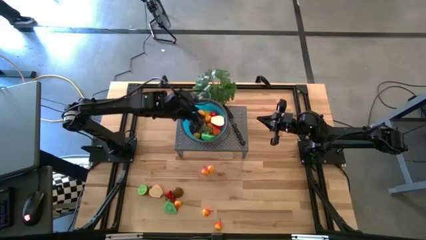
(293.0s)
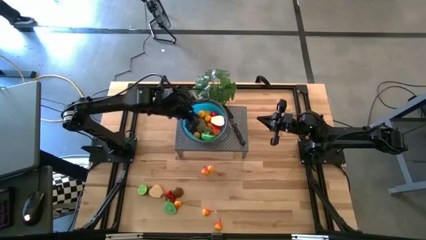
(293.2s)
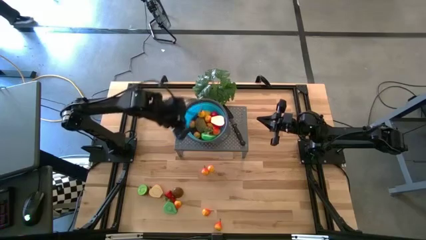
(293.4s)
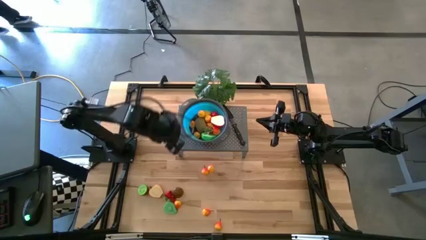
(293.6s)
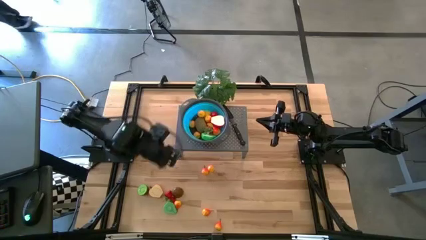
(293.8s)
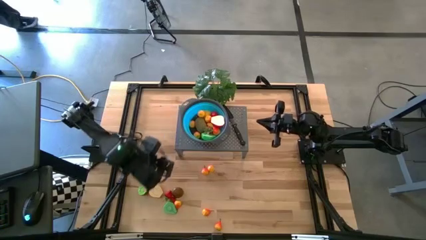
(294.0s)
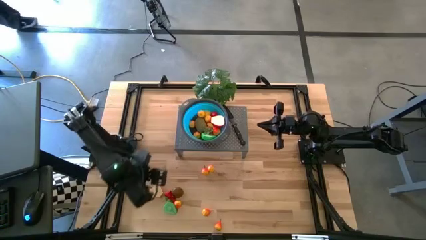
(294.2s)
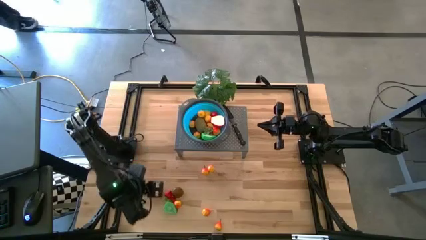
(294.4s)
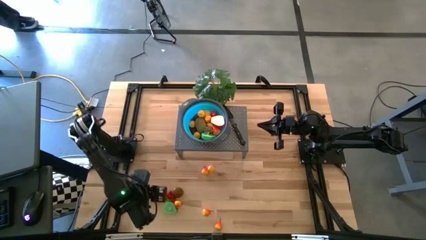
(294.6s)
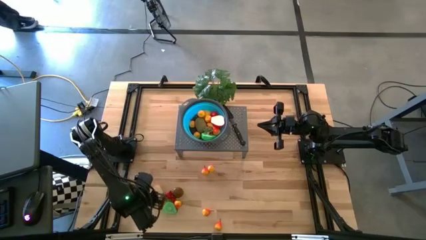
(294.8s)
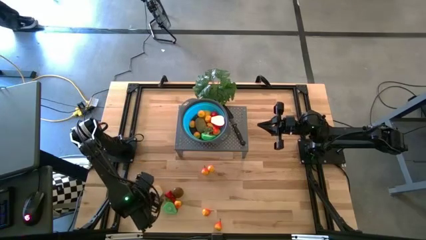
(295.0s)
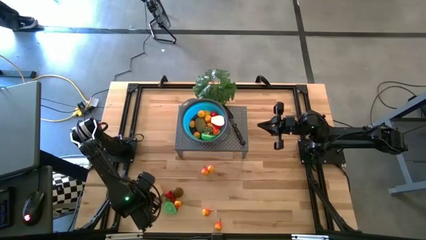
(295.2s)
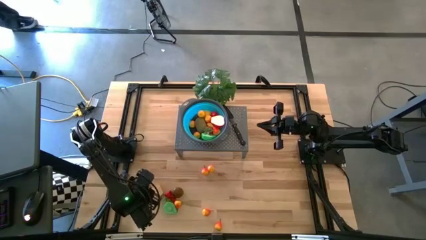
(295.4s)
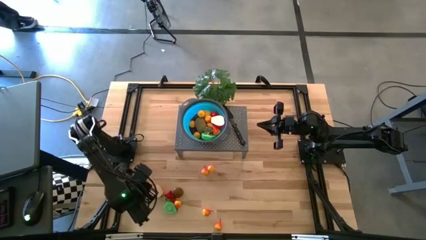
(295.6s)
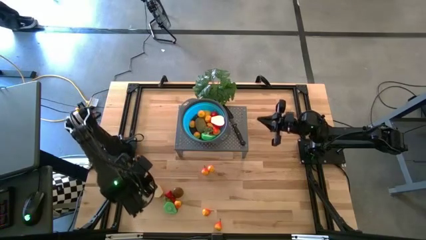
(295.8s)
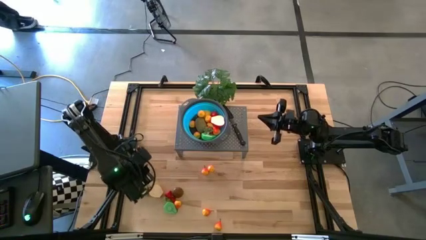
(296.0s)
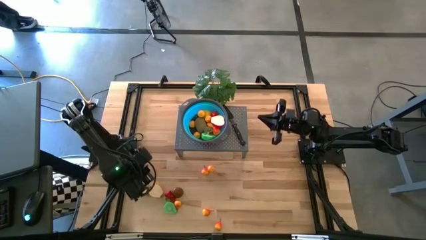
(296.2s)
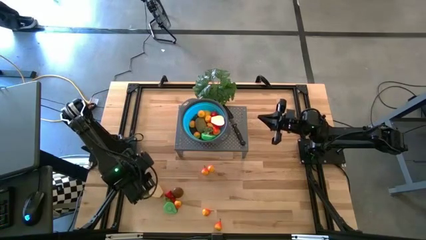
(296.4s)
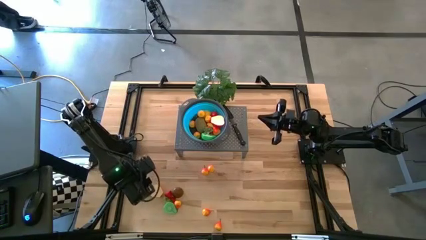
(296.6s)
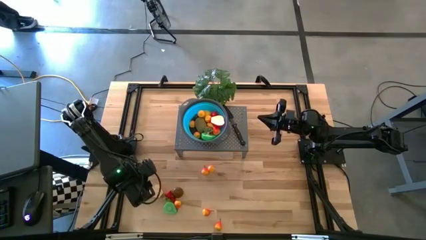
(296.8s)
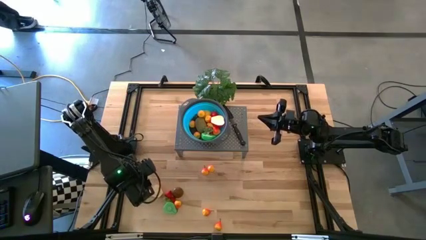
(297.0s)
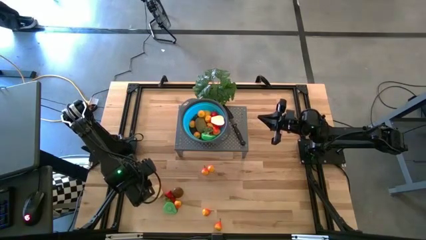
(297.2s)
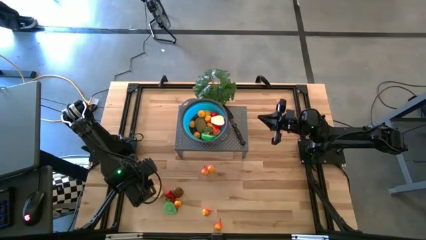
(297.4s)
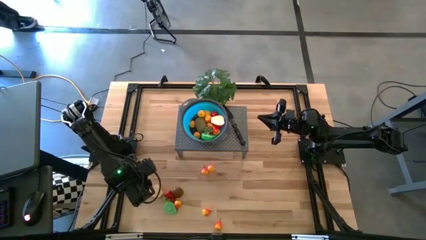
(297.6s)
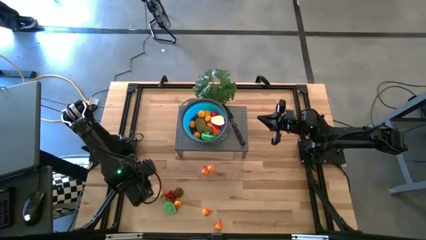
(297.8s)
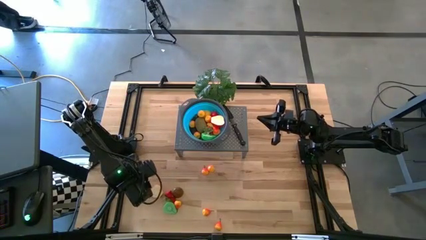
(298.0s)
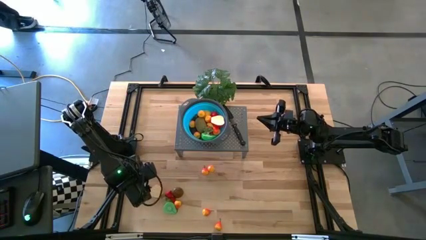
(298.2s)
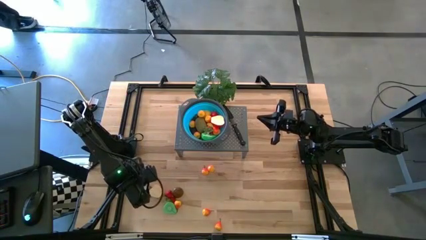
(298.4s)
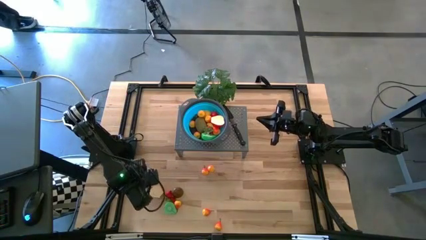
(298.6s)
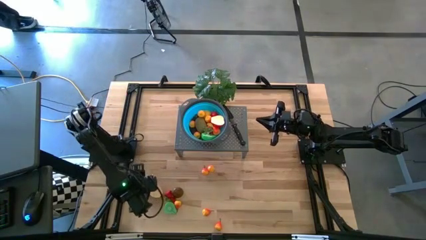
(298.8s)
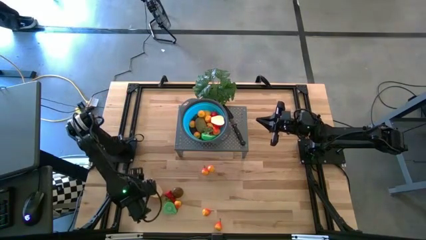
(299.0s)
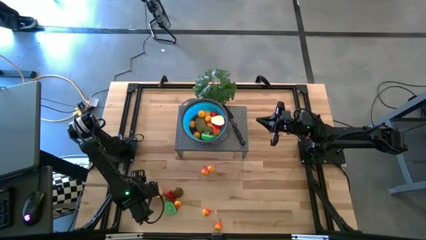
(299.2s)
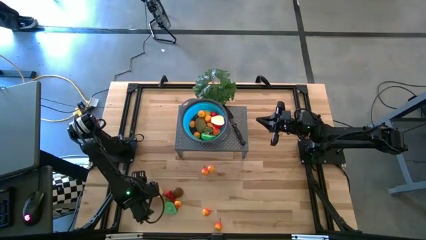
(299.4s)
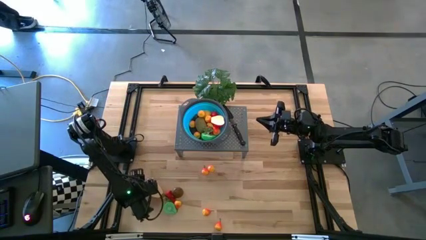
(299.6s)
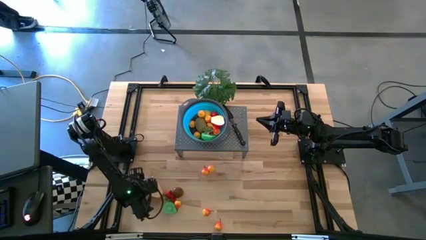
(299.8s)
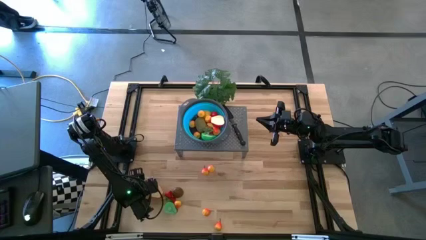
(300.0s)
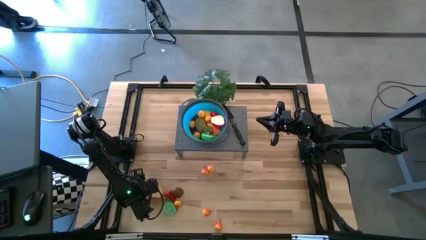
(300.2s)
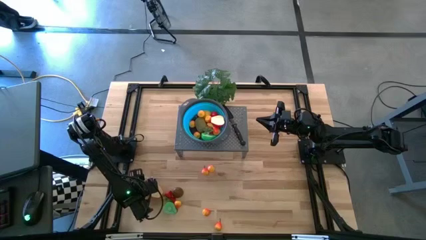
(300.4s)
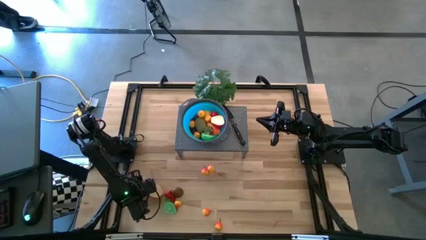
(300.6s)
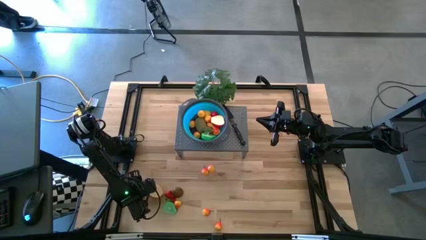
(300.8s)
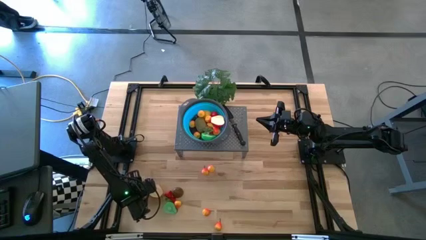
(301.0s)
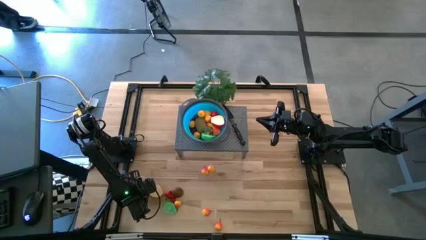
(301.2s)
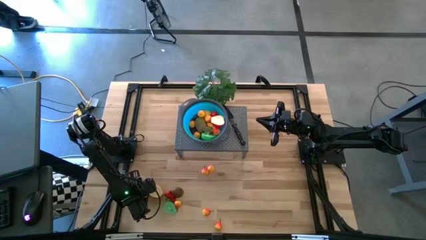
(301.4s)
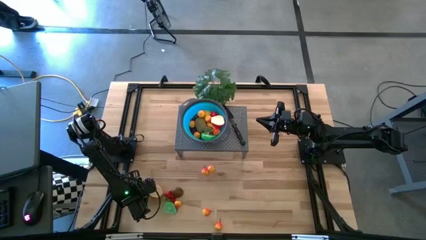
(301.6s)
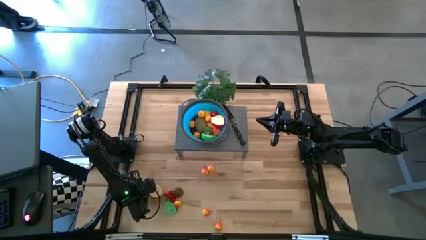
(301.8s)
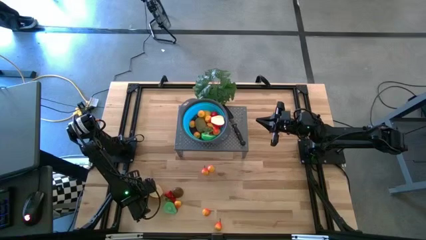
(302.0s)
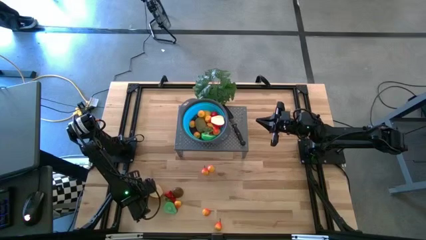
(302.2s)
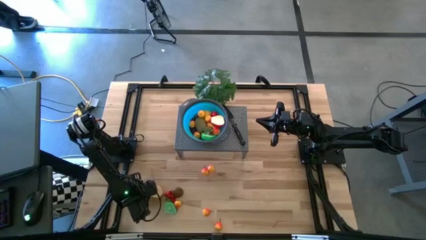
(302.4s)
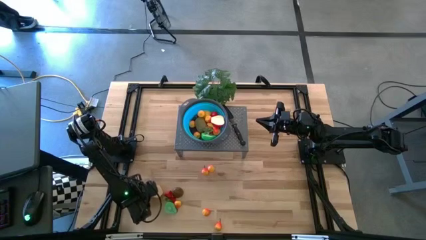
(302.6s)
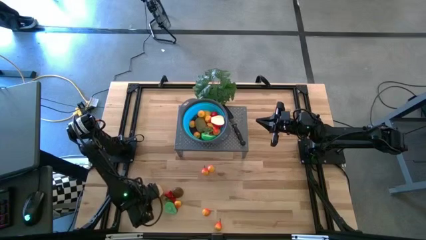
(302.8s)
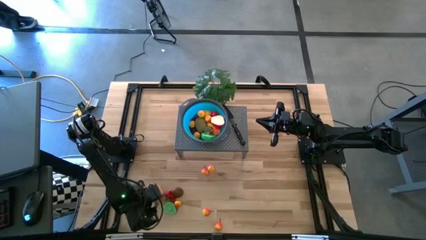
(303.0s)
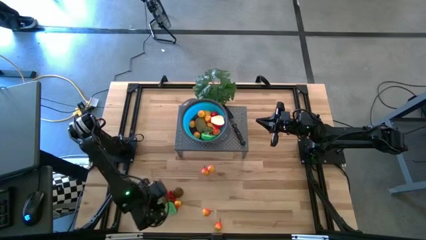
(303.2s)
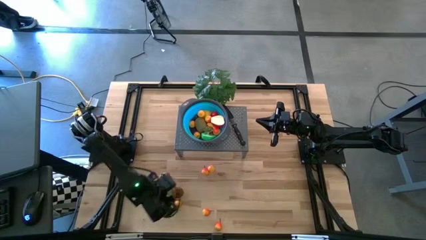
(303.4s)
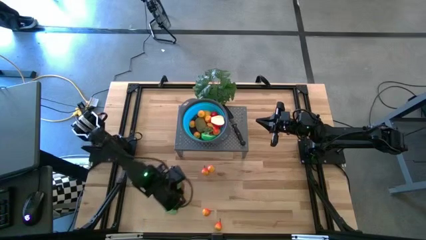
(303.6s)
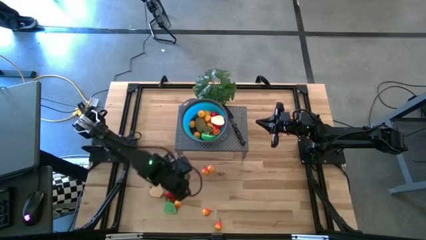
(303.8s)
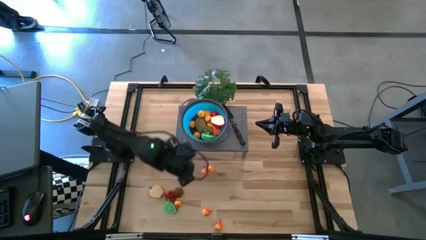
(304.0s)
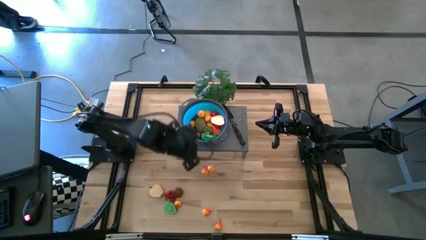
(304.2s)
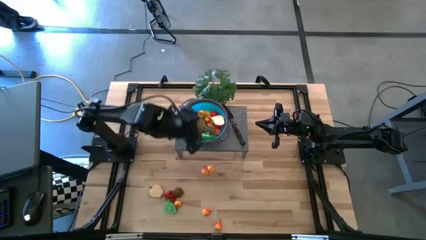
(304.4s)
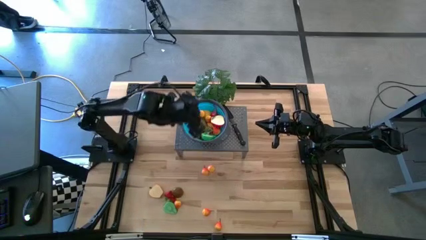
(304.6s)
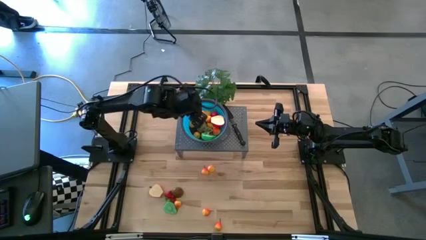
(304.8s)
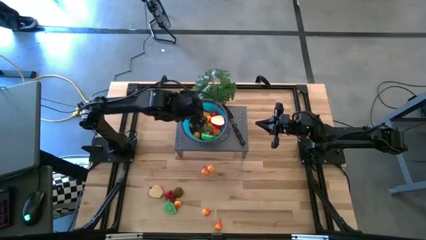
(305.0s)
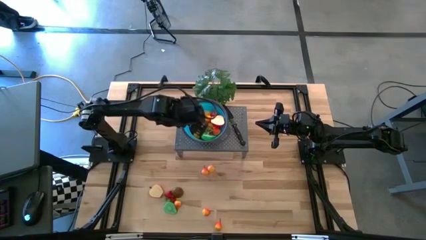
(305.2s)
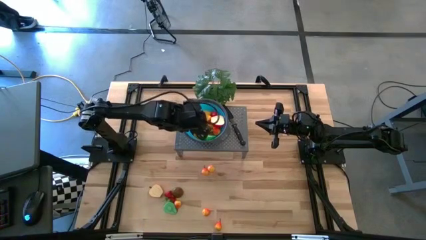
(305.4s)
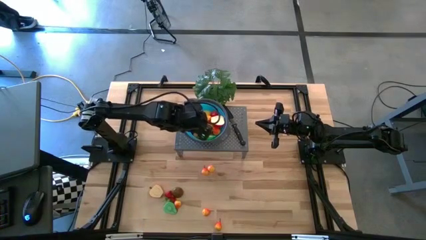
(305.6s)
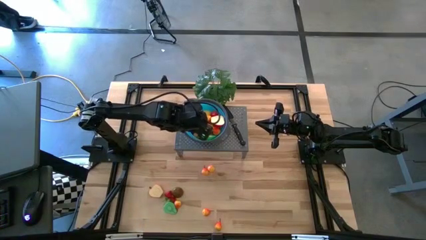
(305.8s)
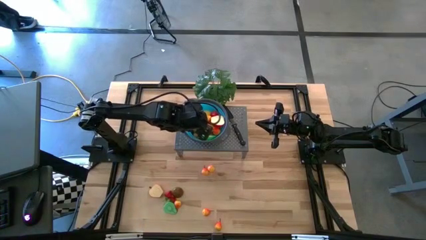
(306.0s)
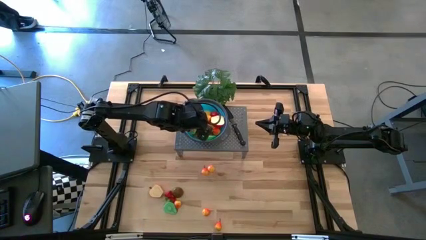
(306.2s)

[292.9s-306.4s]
Task: Pick & Place Fruit
Put the kiwi into the blue strainer bowl on the shelf
